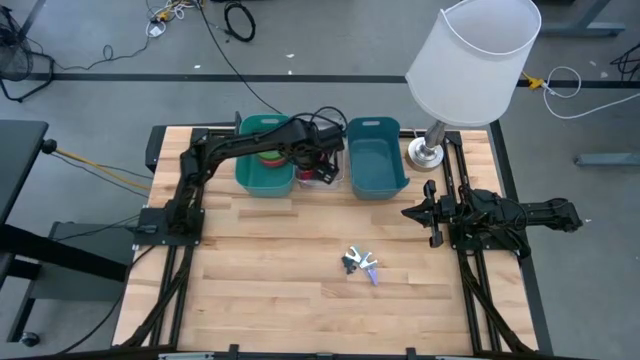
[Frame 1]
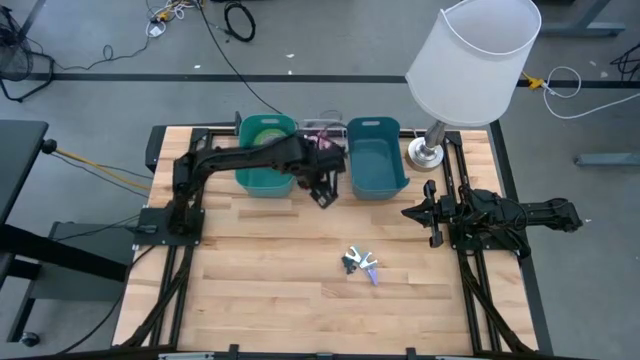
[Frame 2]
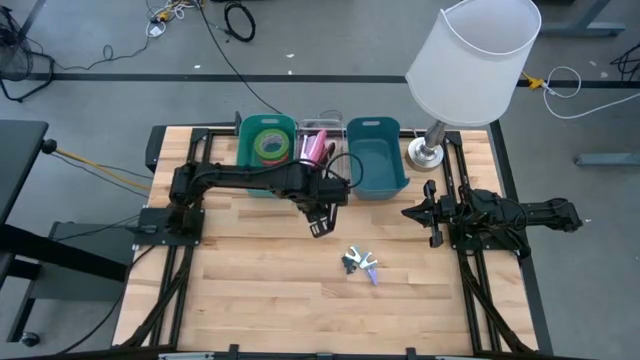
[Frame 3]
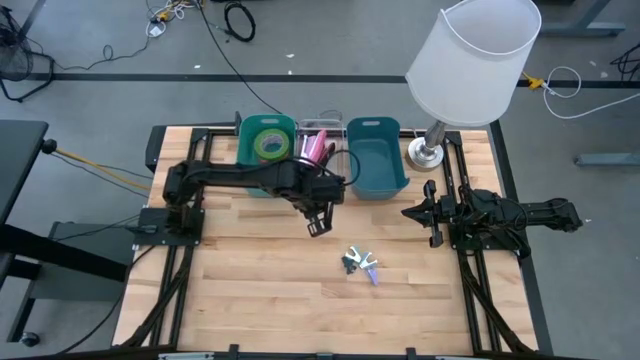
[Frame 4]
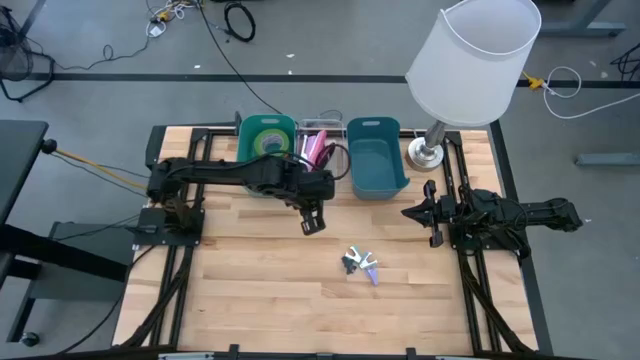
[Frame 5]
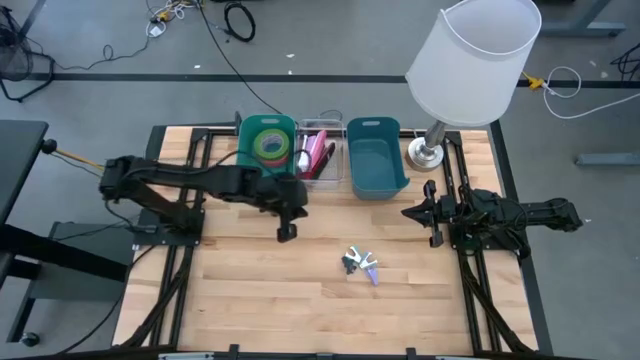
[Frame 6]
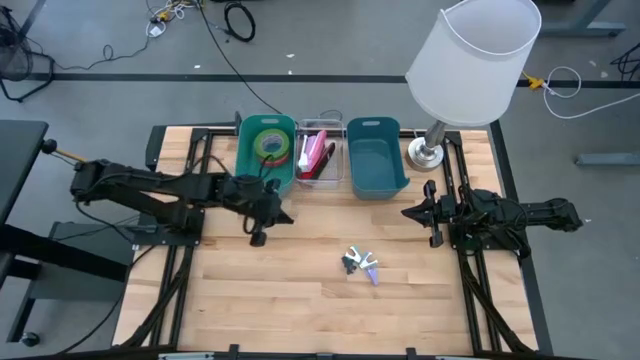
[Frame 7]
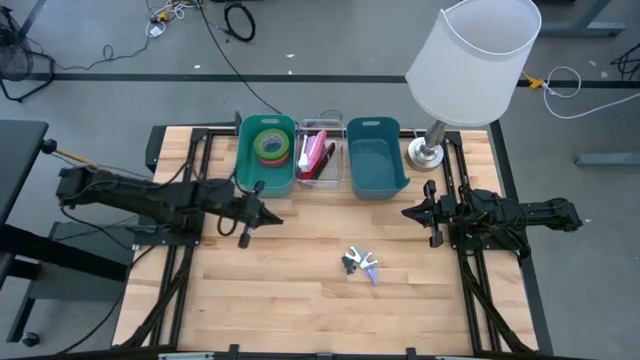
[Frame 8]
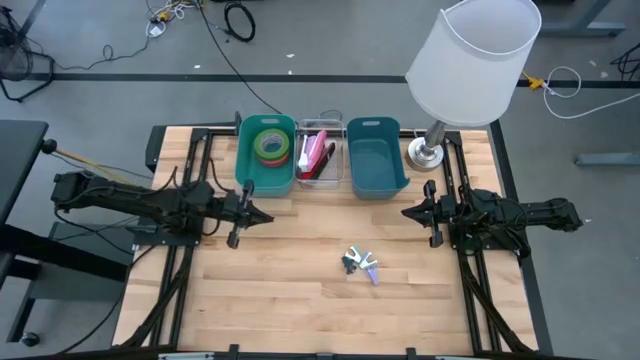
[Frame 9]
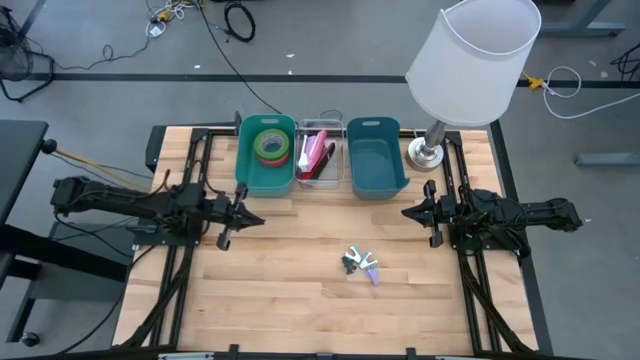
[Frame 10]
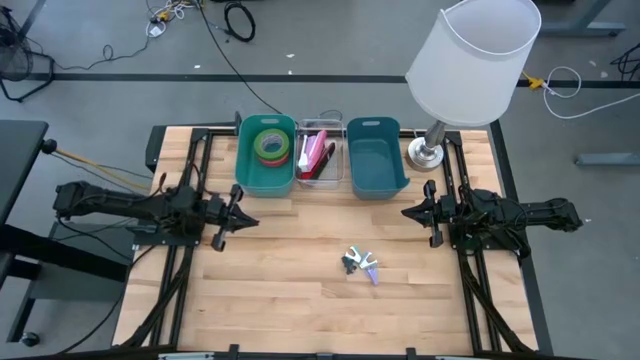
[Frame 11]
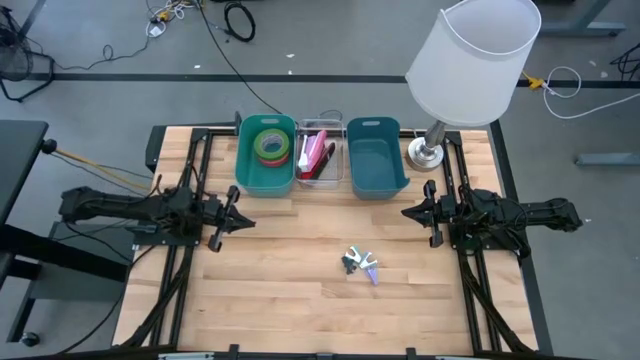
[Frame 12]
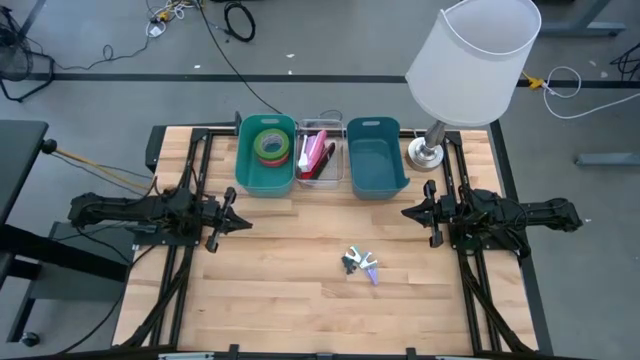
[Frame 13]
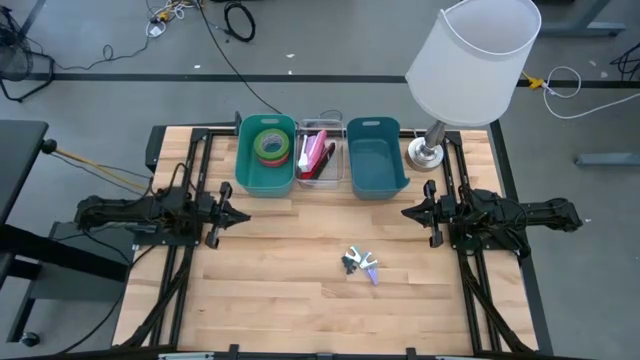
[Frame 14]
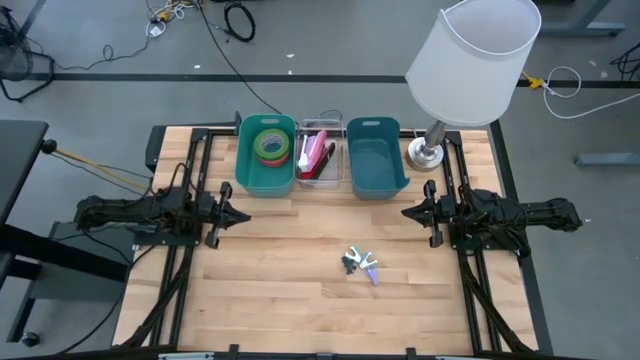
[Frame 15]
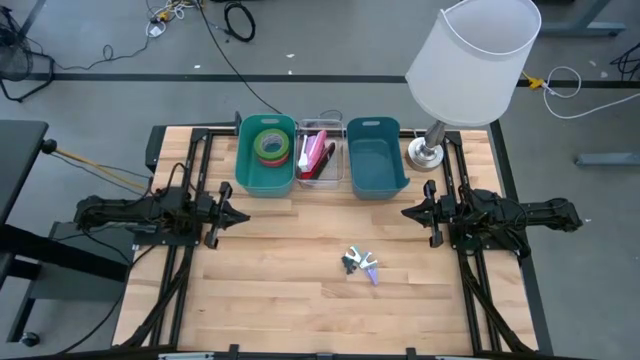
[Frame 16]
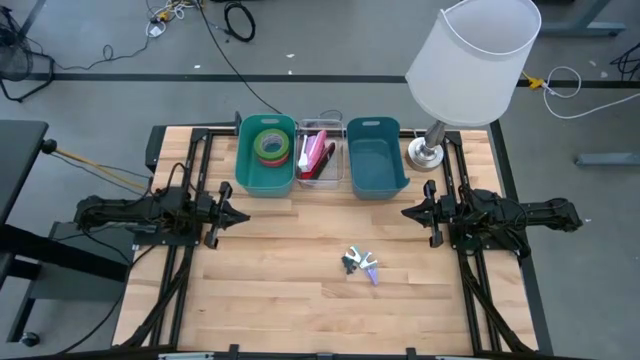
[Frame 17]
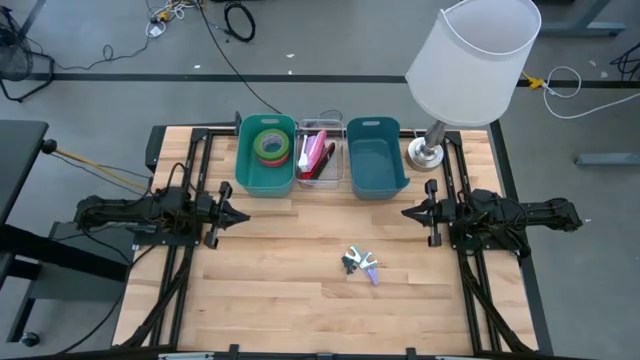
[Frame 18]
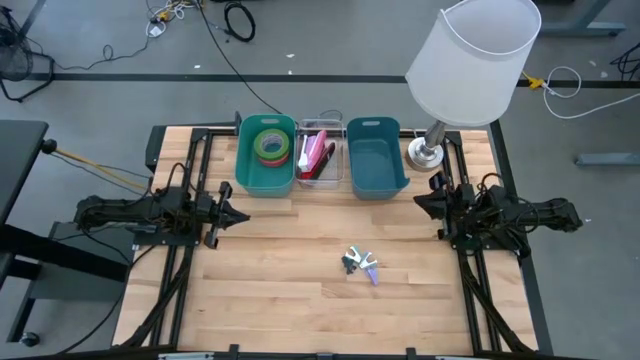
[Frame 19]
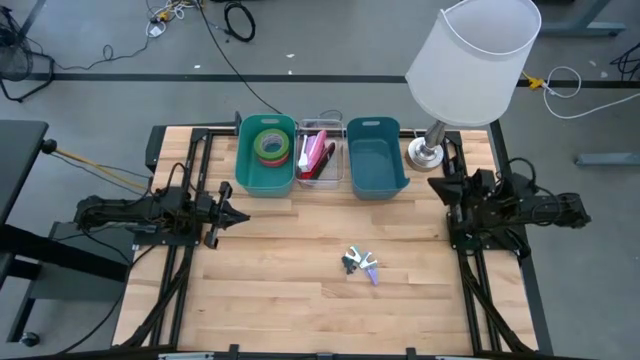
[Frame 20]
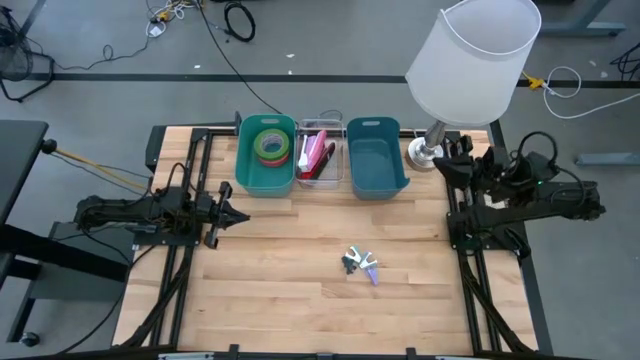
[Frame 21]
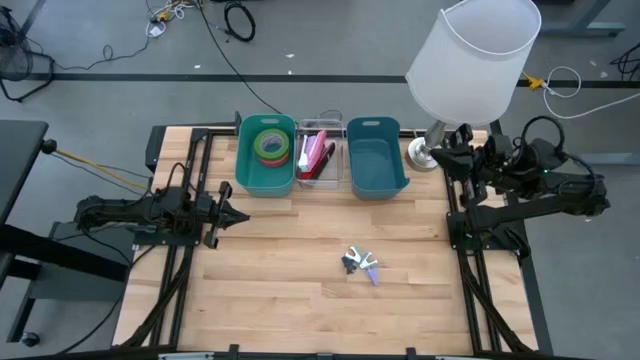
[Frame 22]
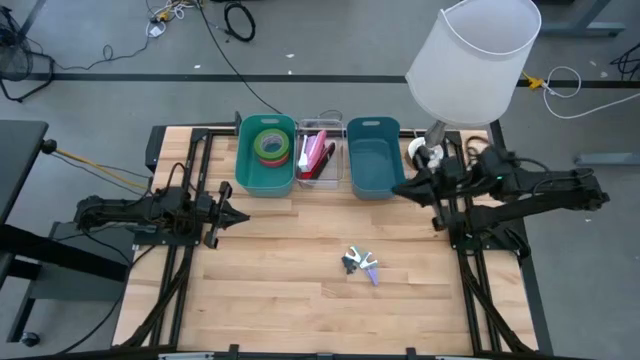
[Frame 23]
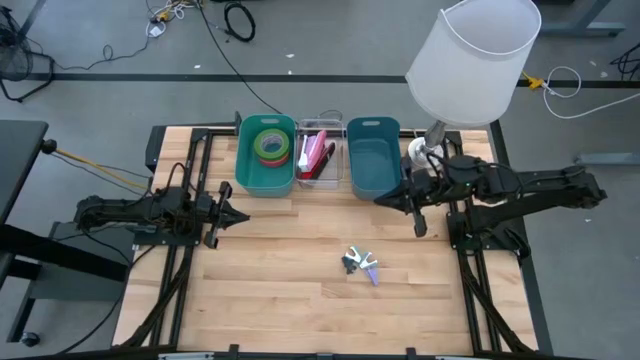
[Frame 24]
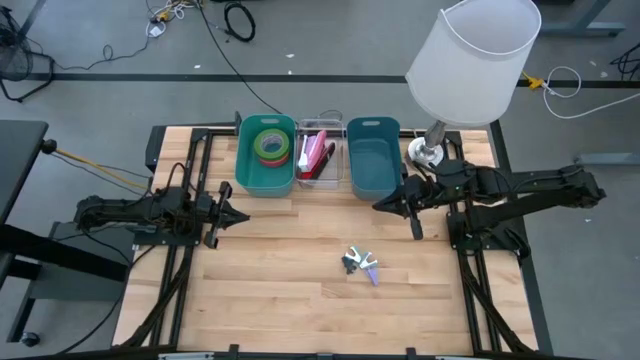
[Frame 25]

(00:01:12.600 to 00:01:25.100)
Task: Pick and place Stapler, Stapler remover, tape
Put the violet staple remover into the blue bin

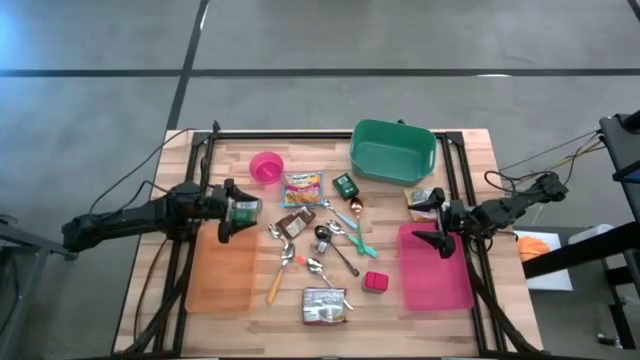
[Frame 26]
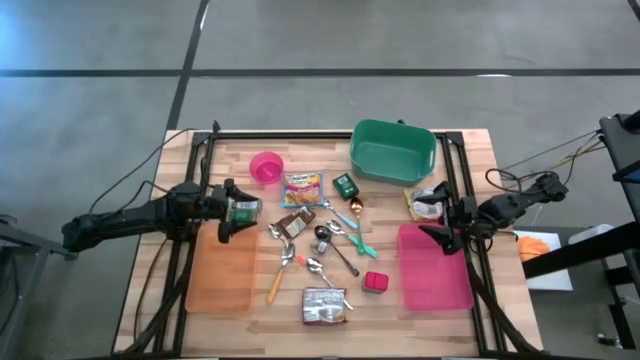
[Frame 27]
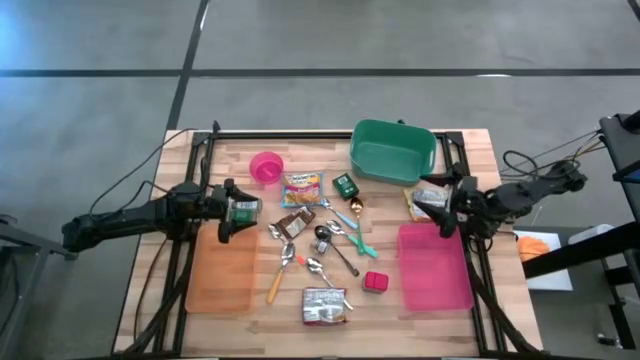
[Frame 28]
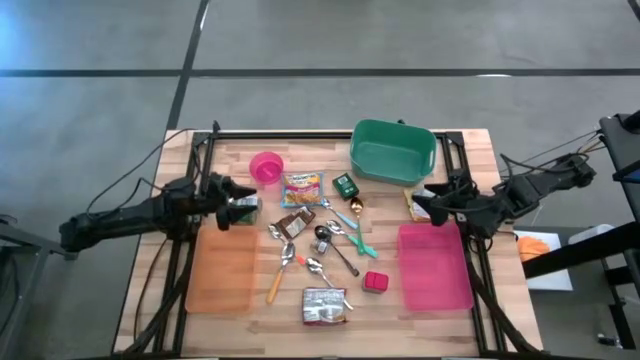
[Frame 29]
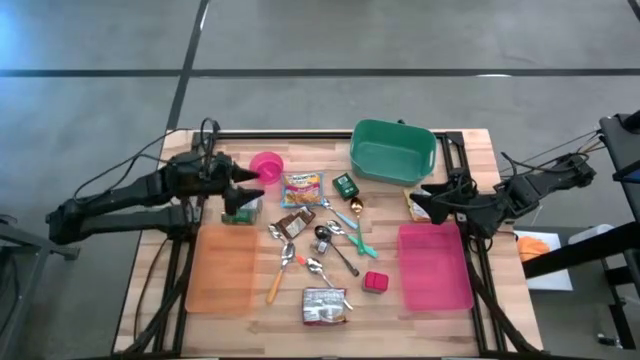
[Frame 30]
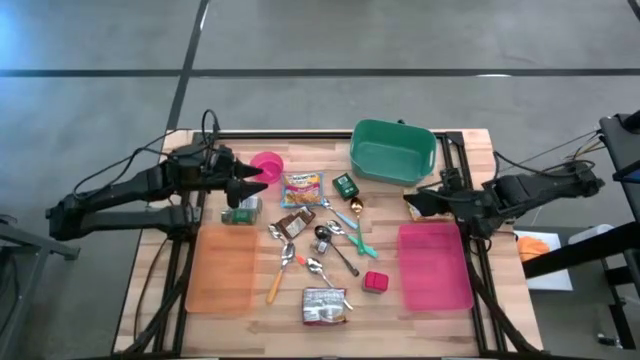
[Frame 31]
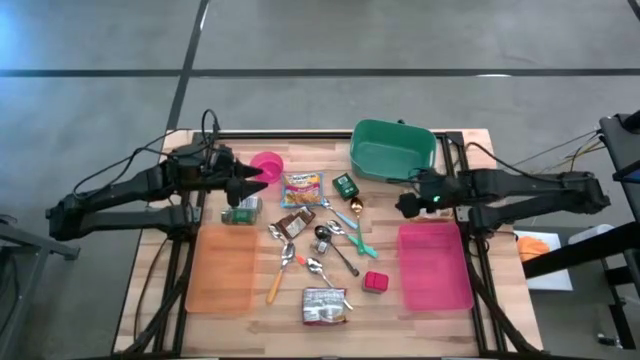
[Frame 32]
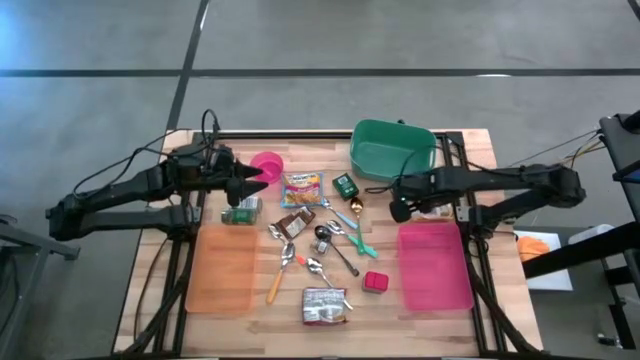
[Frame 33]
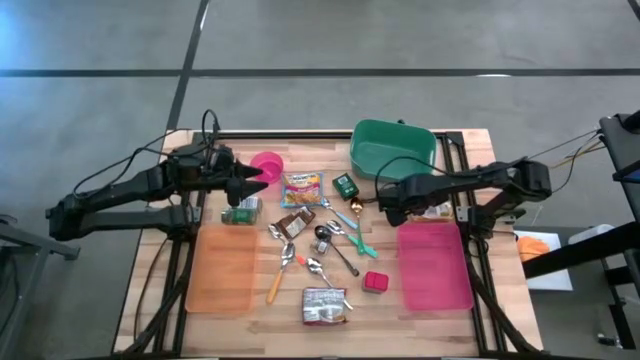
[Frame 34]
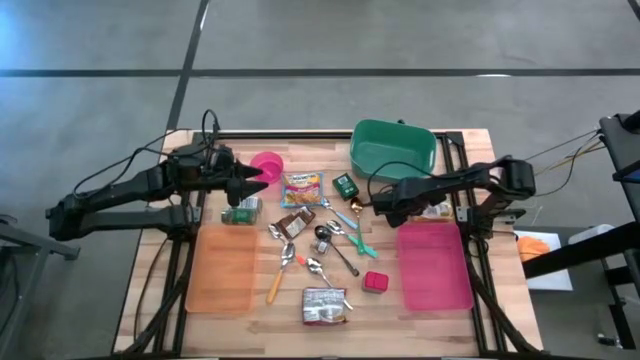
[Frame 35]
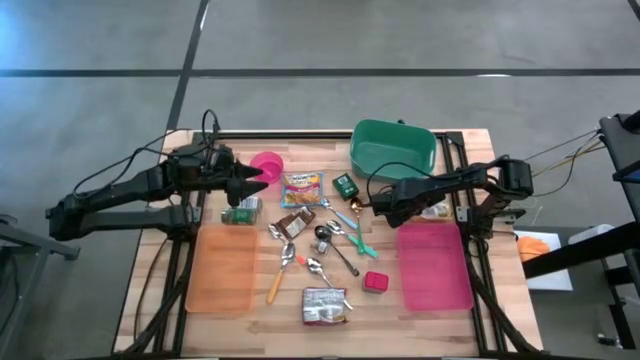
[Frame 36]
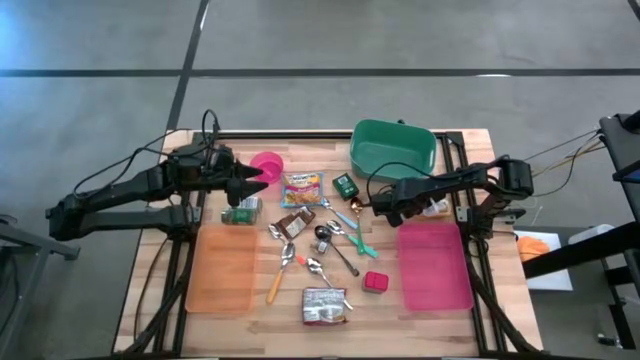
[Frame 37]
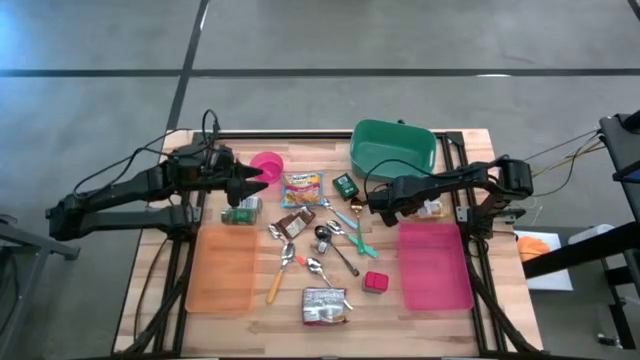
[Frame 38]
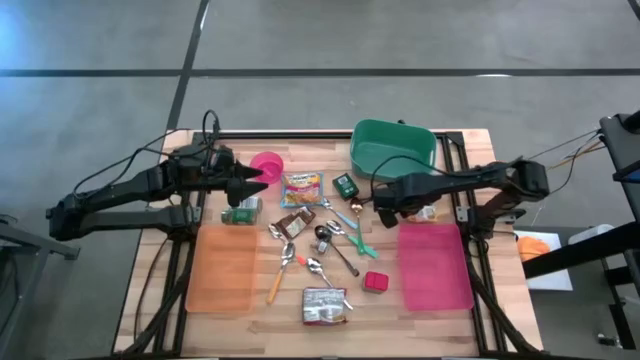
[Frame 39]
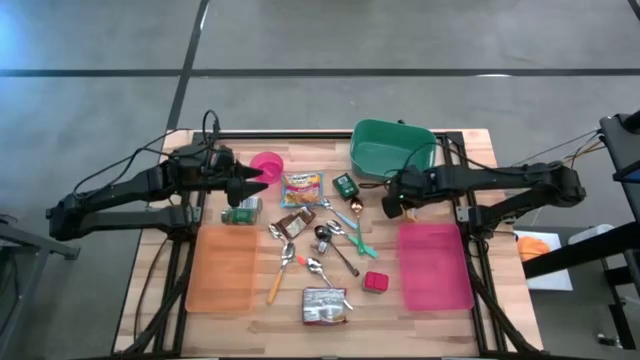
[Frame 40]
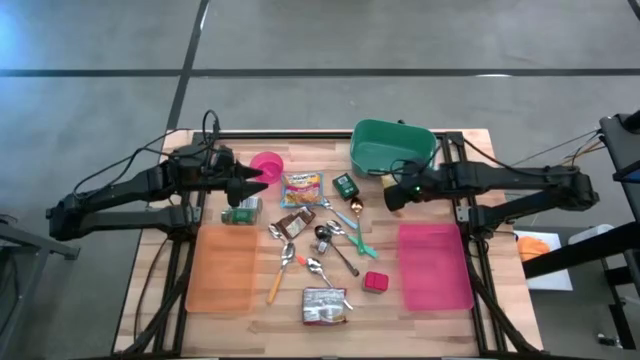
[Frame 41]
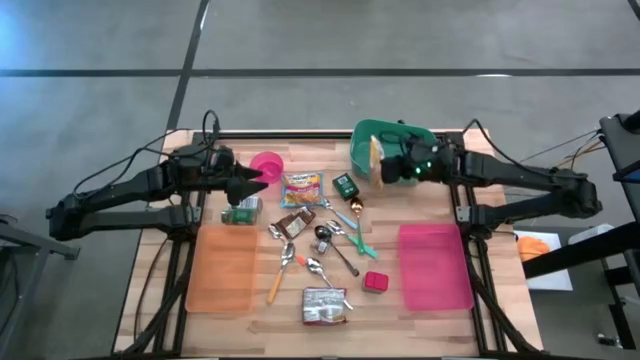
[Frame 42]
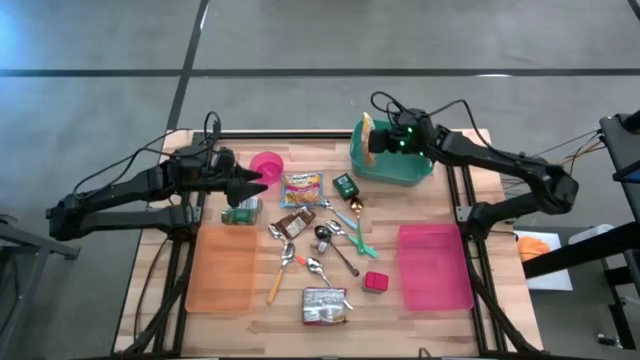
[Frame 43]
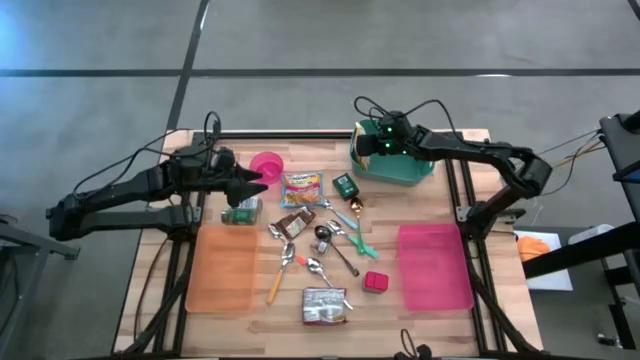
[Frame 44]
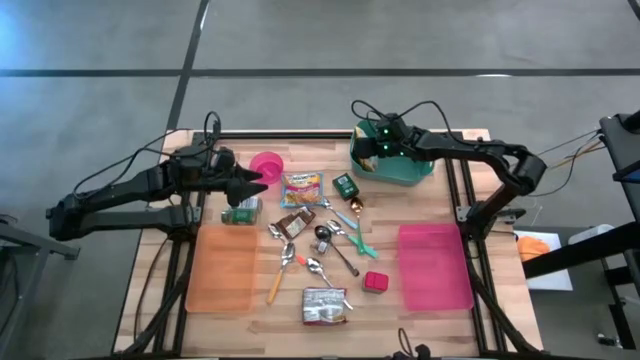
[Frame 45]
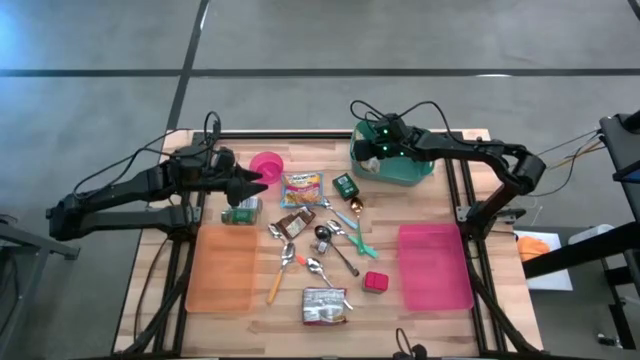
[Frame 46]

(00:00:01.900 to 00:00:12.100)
Task: Pick & Place Food Item
Put the yellow noodle pack into the green bin
